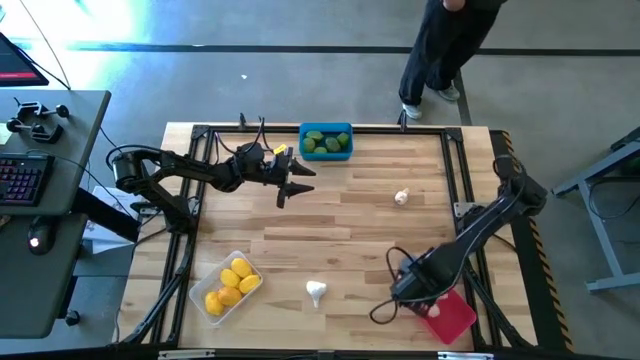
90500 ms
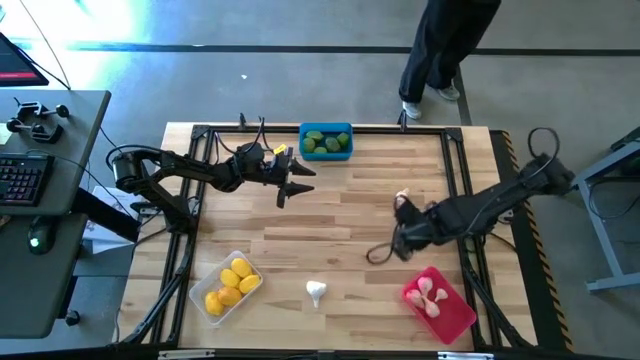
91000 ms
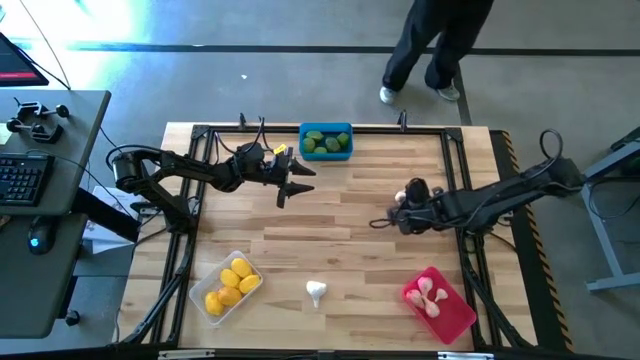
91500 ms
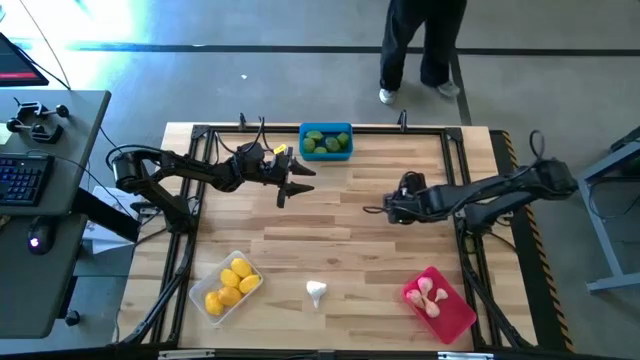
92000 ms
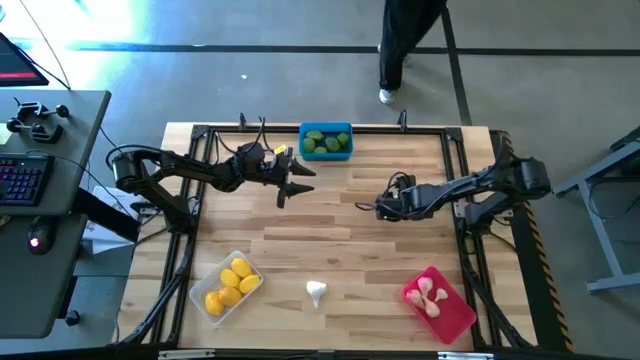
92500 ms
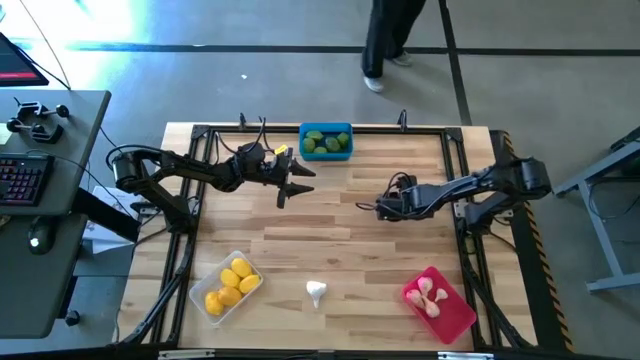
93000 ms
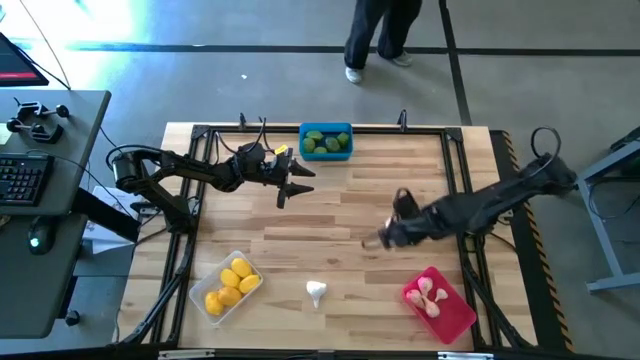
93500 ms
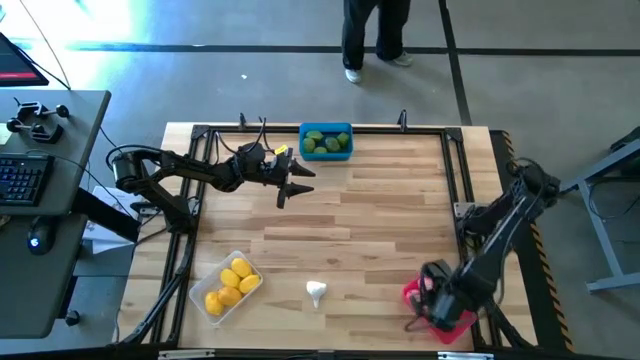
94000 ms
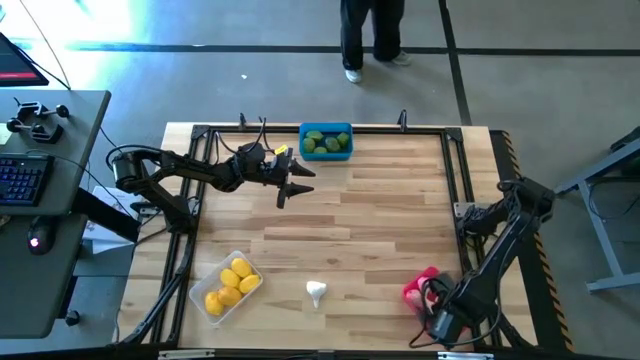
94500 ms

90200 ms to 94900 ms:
Task: Sort produce into baskets
Put the garlic into the red bin

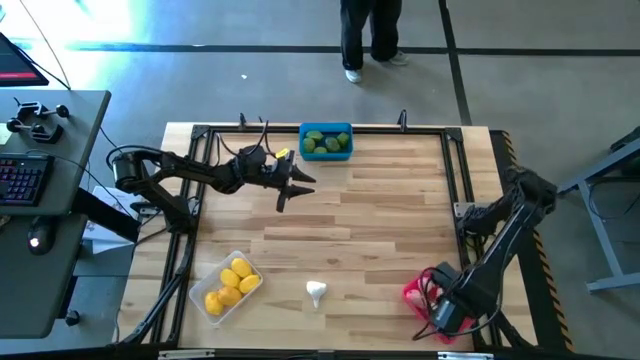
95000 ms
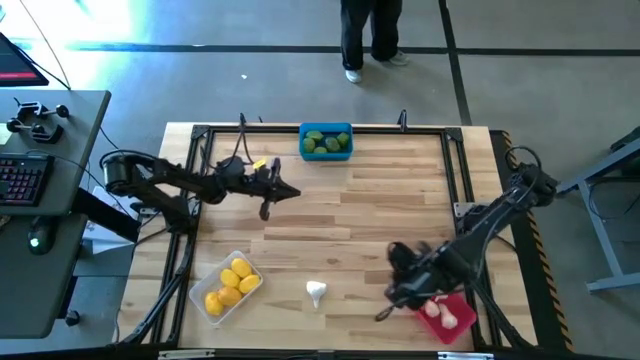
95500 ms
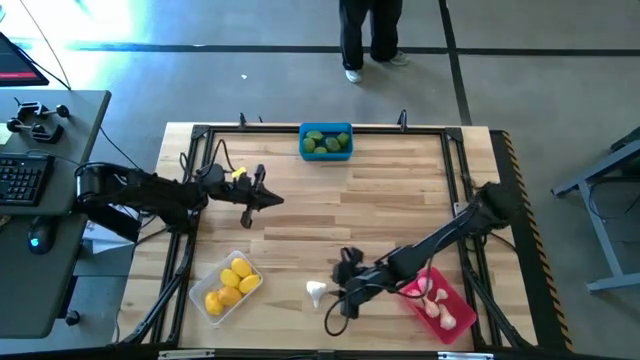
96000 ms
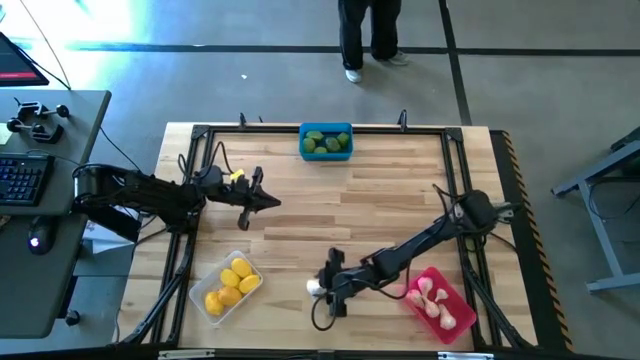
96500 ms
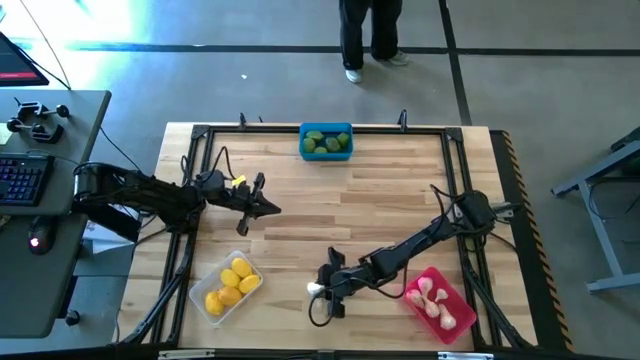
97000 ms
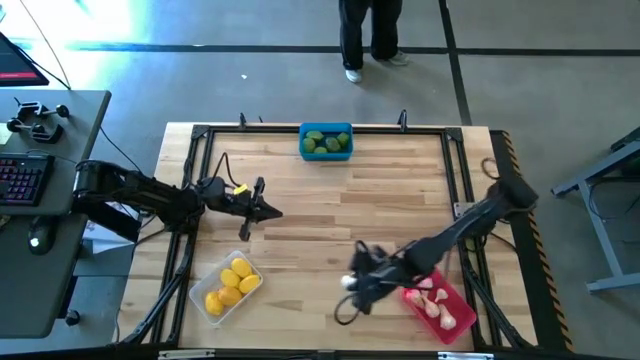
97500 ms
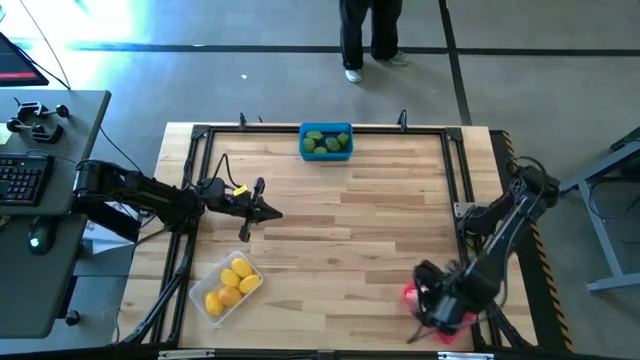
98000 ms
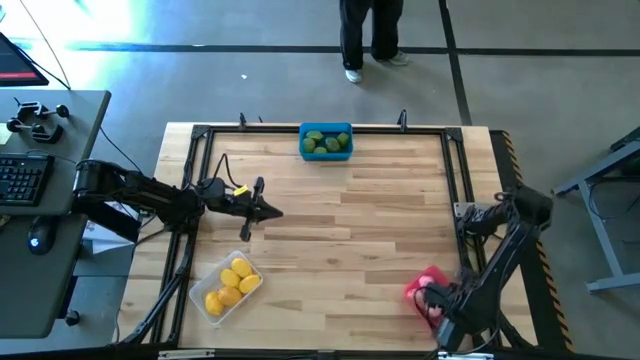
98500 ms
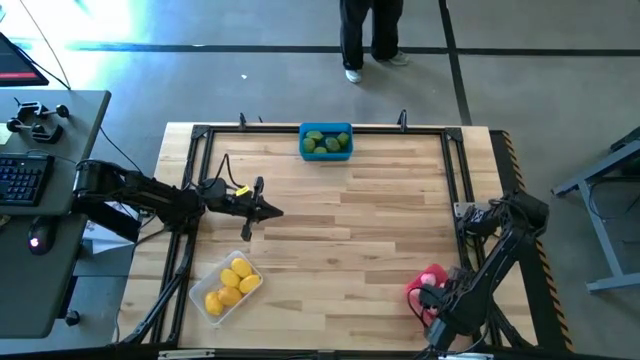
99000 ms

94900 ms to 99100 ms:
Put the garlic into the red bin

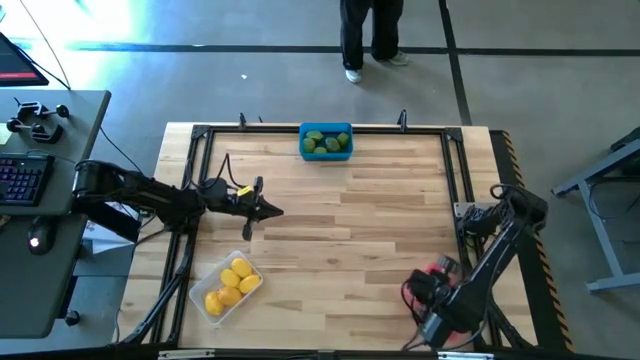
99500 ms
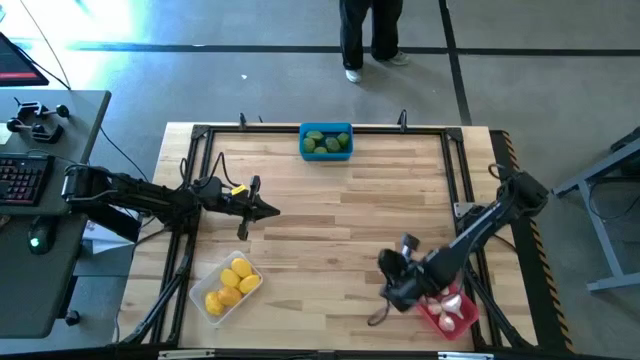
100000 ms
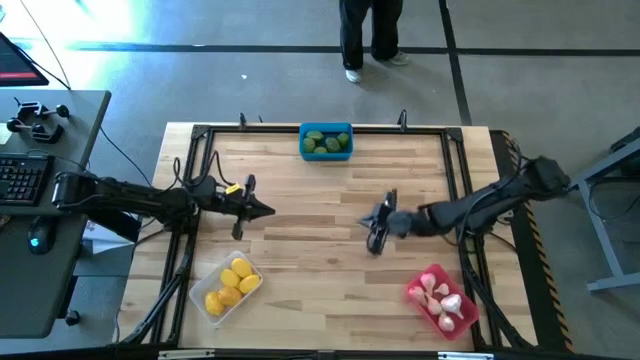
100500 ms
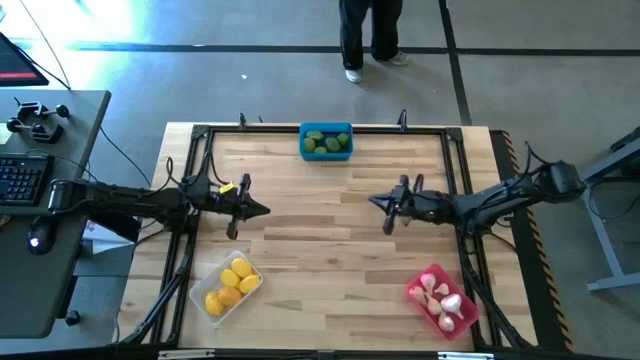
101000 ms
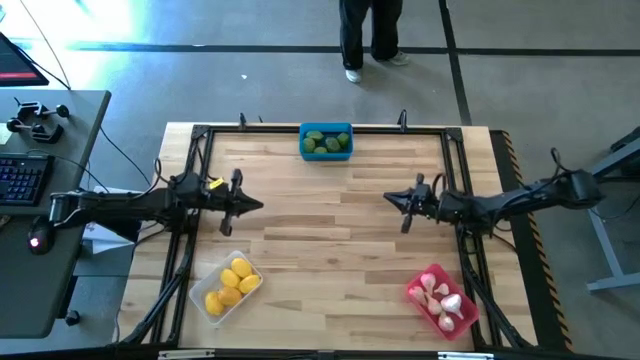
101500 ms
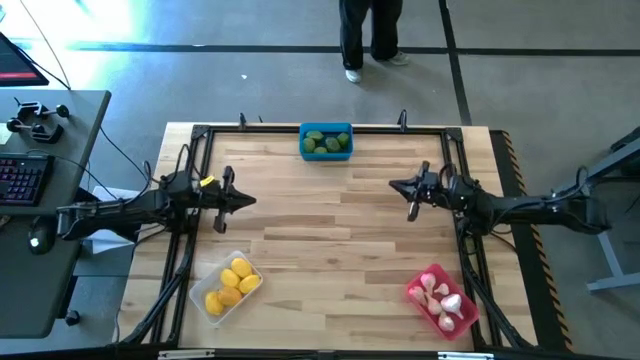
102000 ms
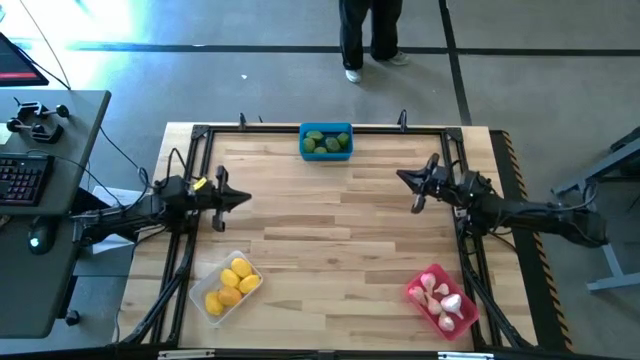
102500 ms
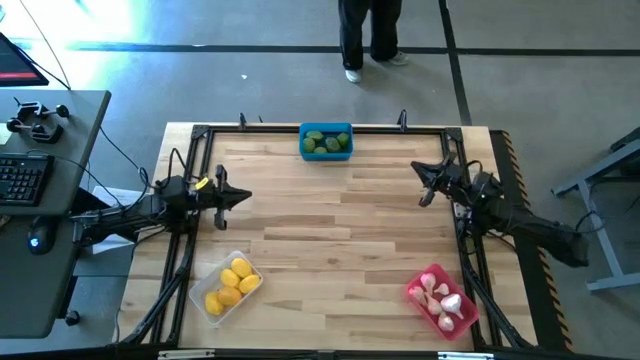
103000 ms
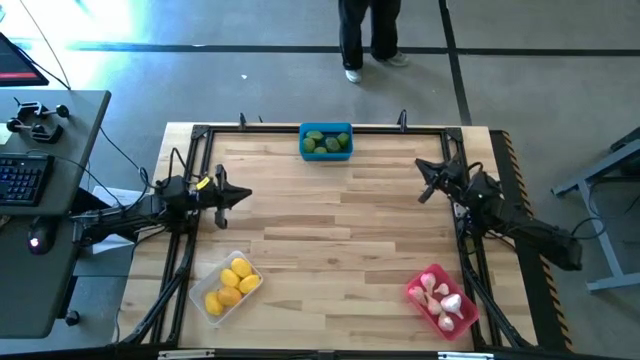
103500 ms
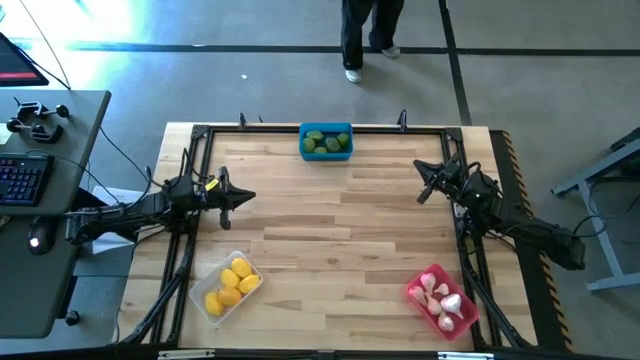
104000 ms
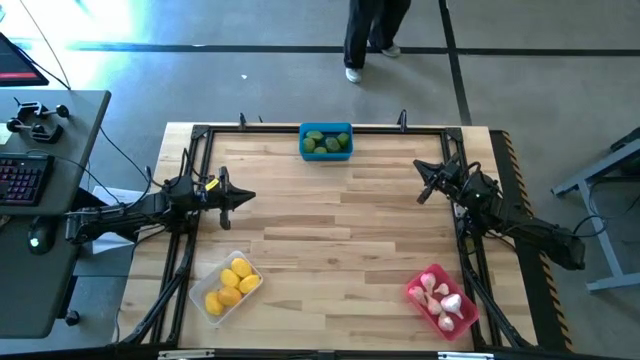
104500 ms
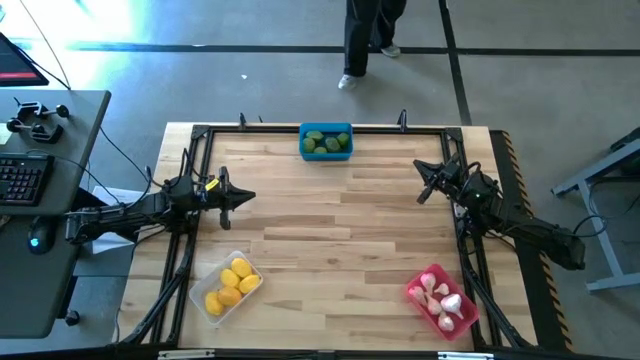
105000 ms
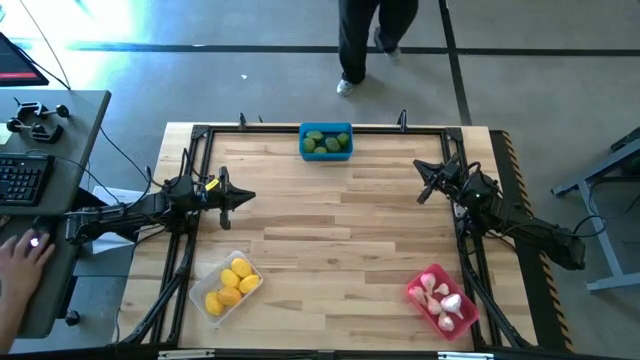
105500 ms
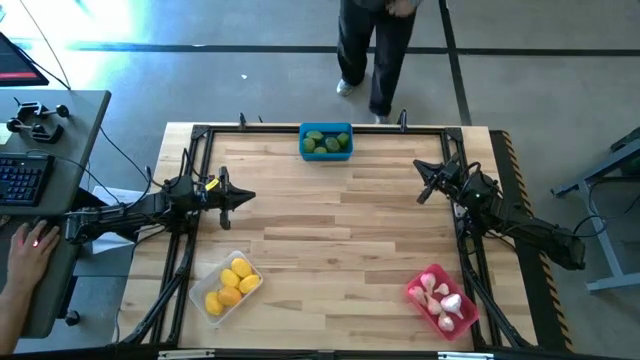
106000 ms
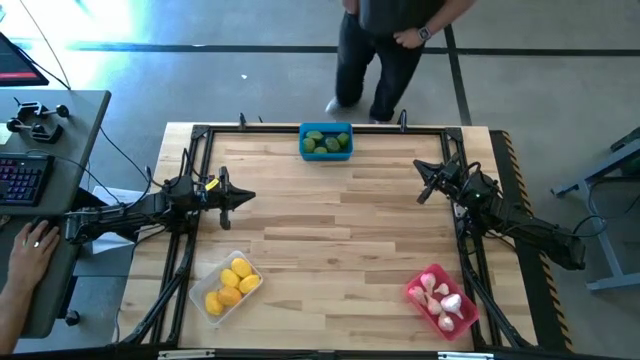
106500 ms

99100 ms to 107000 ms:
Return to home position

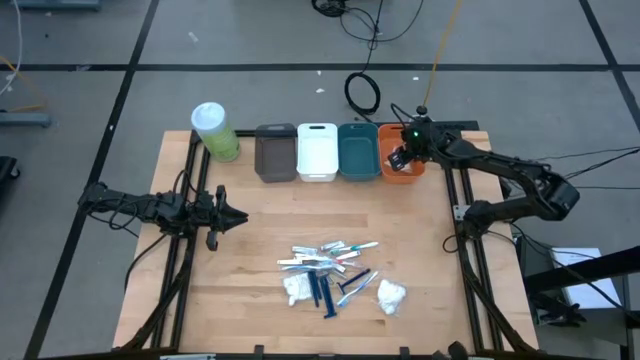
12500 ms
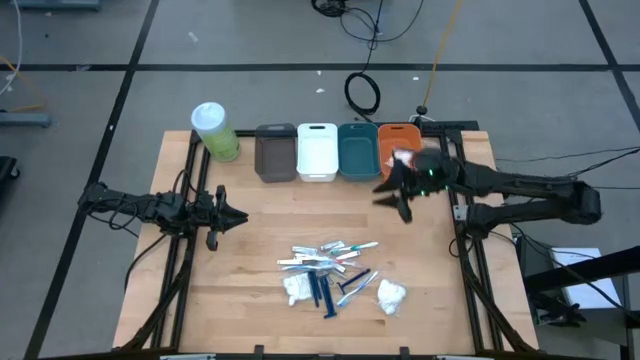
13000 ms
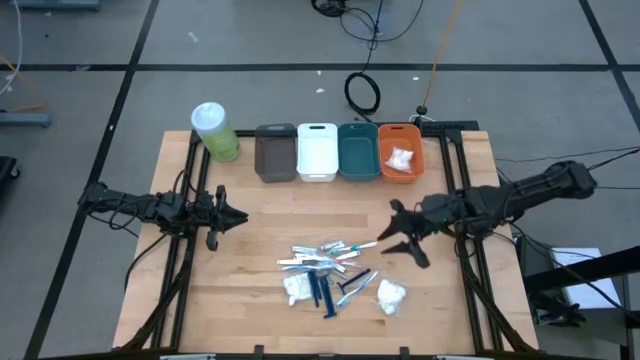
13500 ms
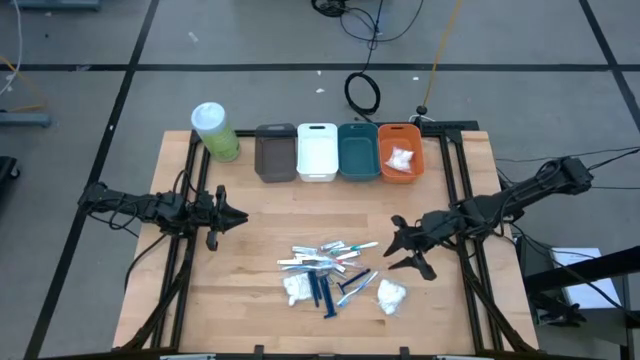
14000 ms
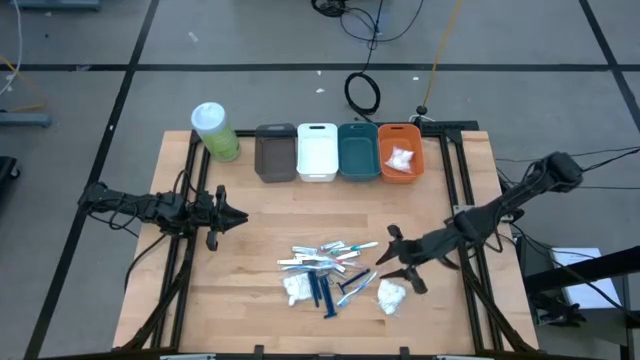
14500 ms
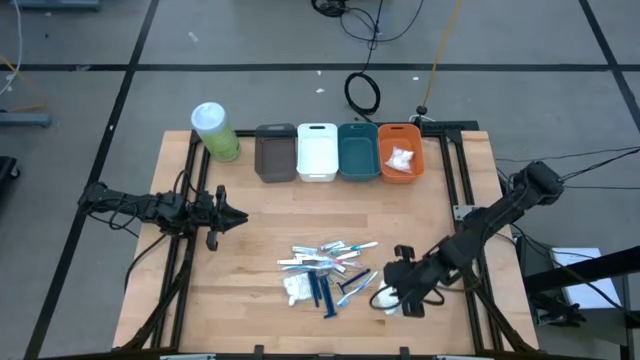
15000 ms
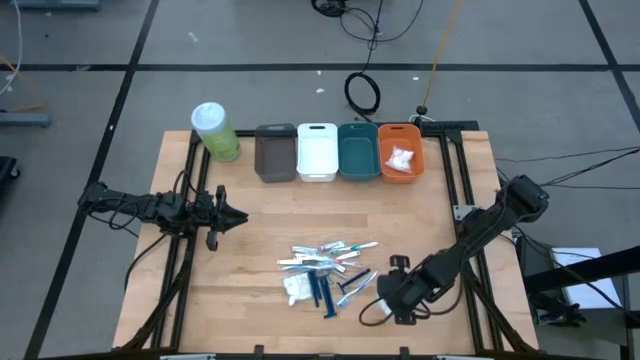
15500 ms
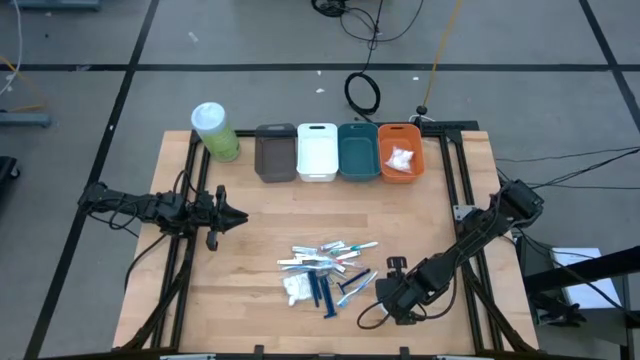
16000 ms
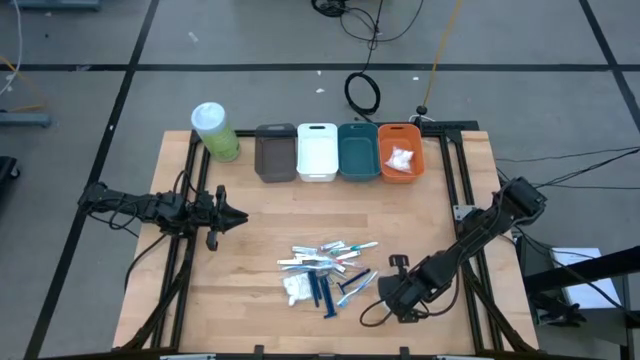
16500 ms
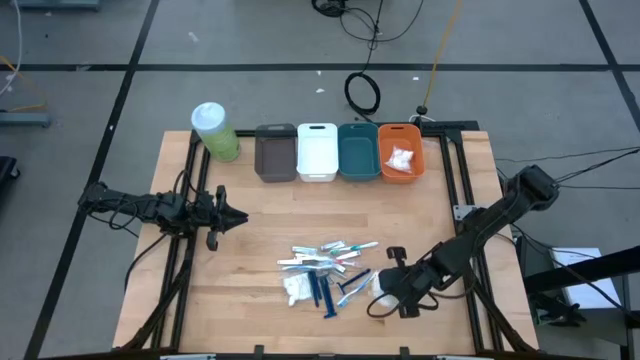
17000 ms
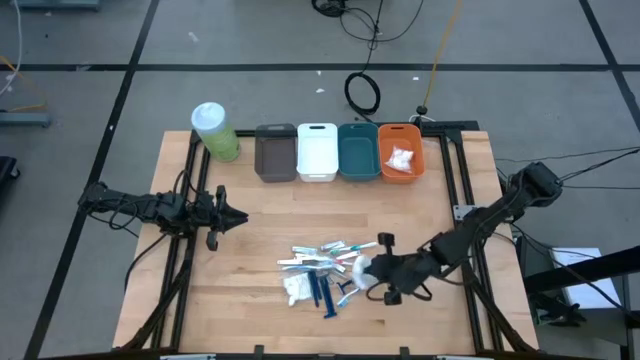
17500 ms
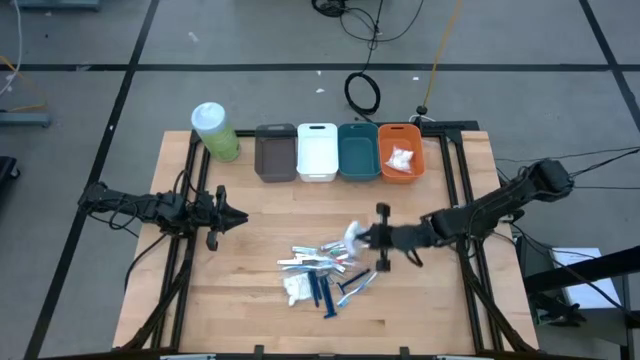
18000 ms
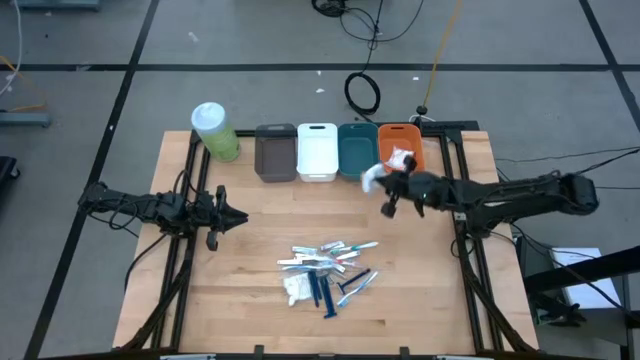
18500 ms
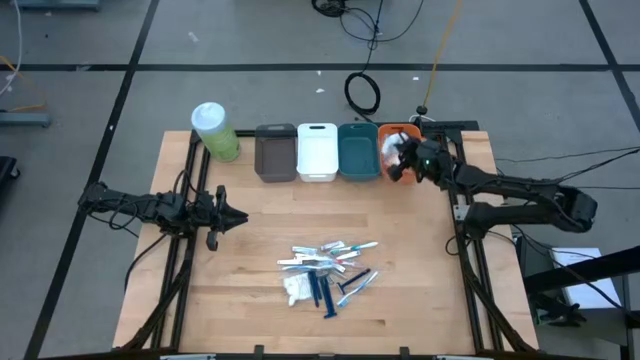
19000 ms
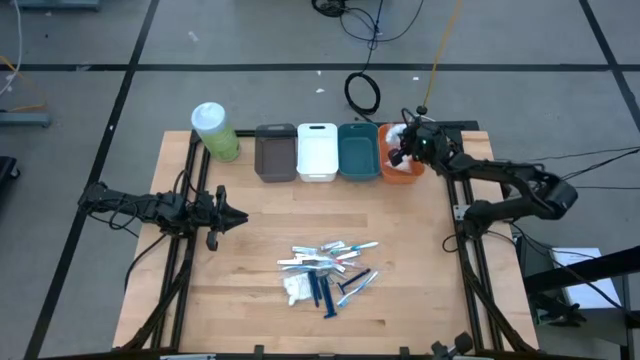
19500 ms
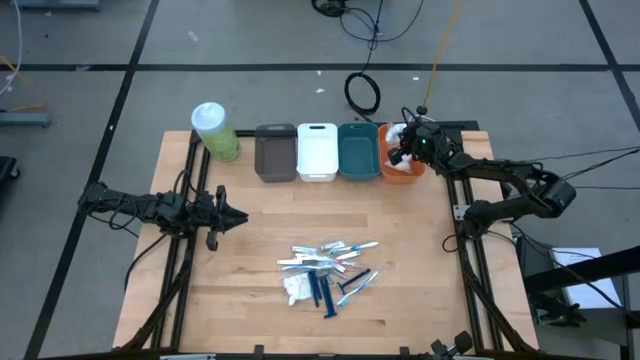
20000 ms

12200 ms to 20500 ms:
Task: Pick & Place Travel size toiletries
Put the white cotton pack into the orange bin
